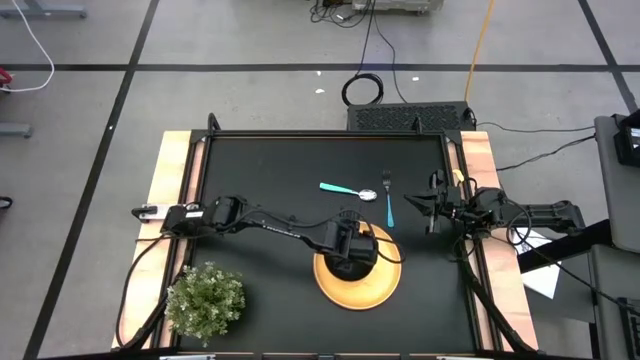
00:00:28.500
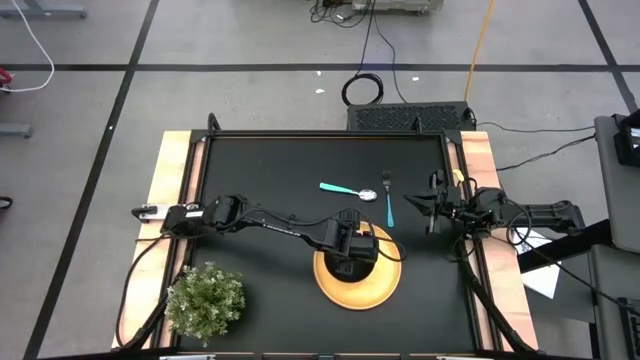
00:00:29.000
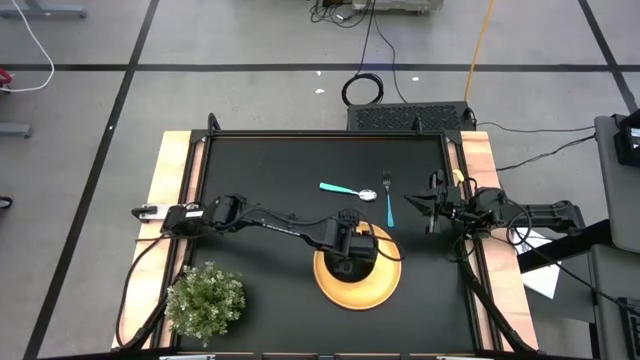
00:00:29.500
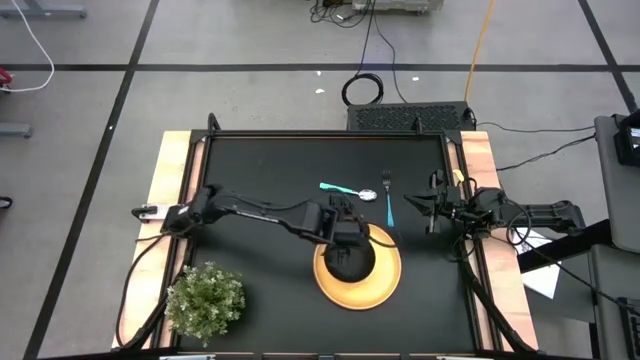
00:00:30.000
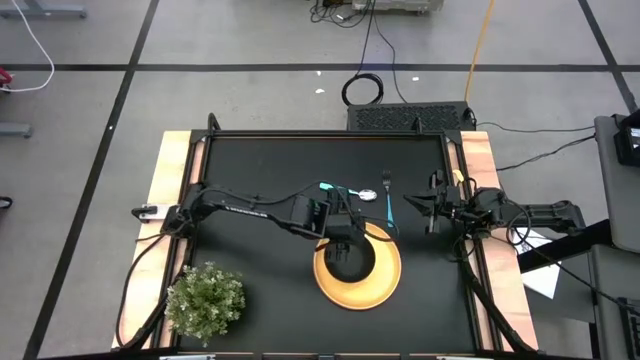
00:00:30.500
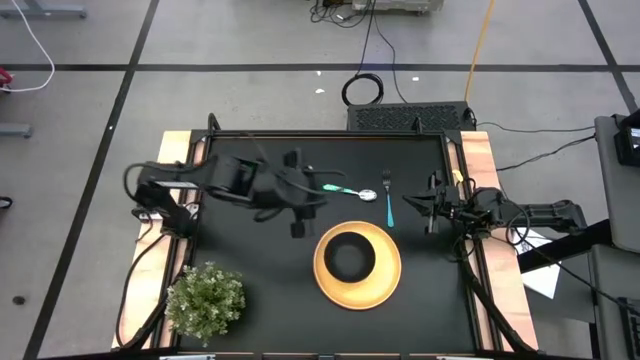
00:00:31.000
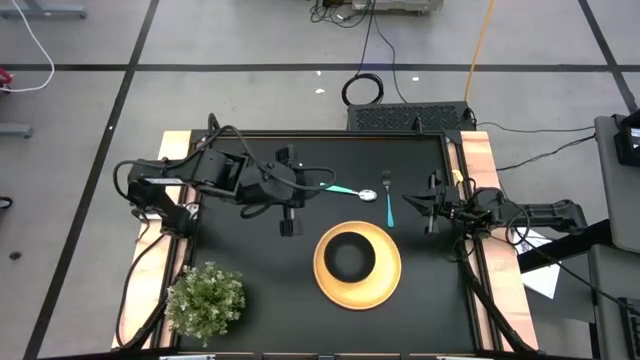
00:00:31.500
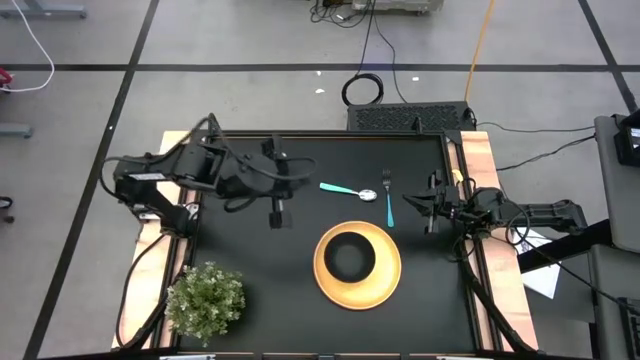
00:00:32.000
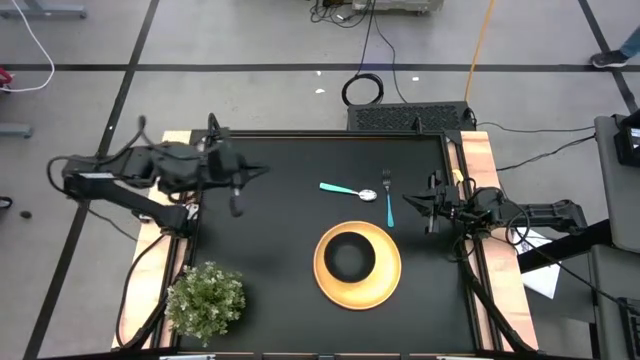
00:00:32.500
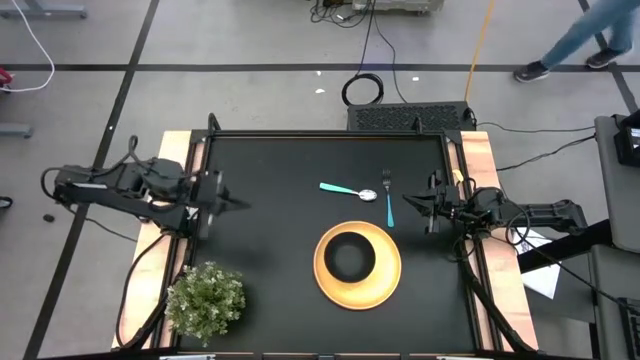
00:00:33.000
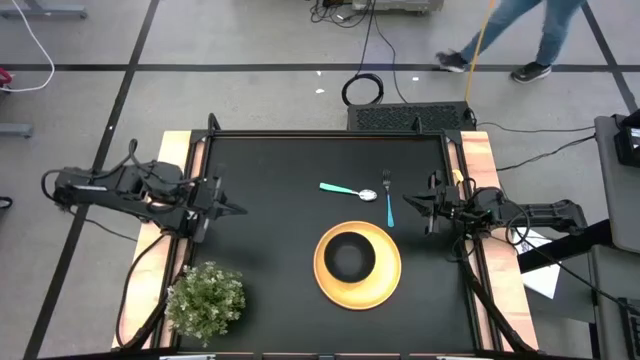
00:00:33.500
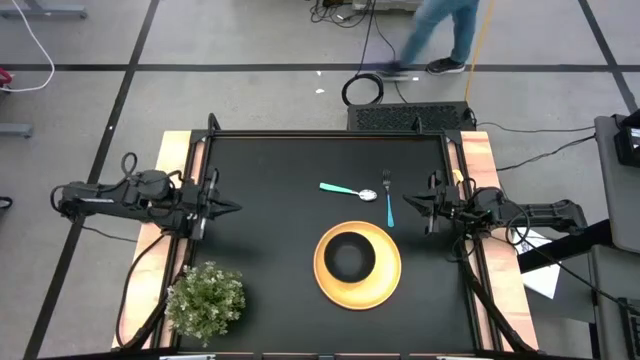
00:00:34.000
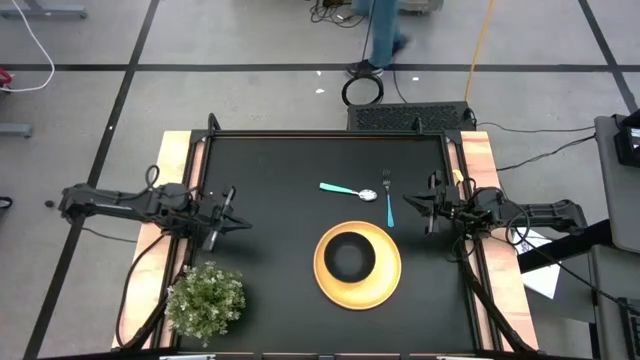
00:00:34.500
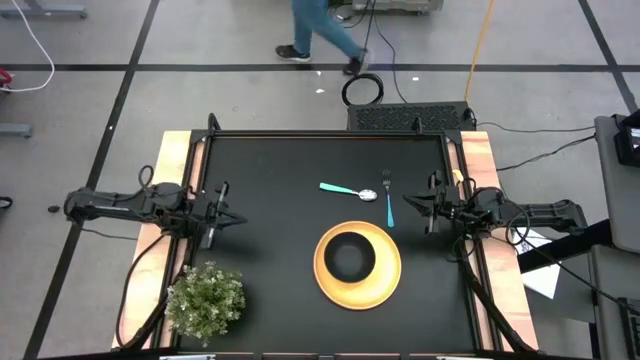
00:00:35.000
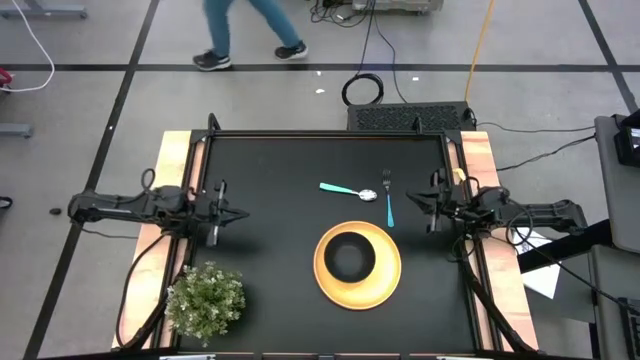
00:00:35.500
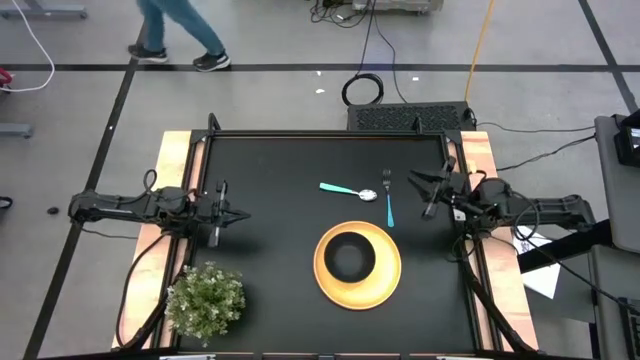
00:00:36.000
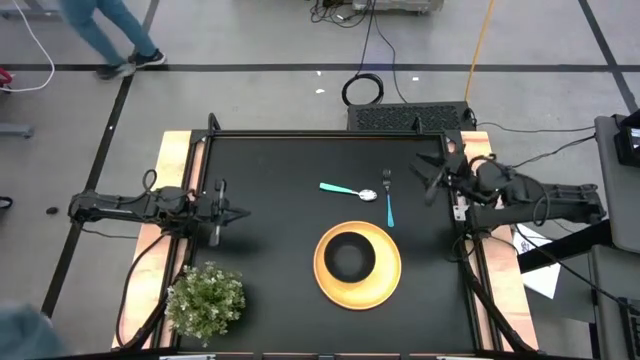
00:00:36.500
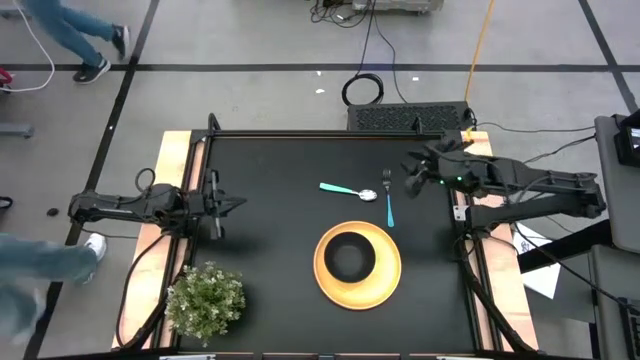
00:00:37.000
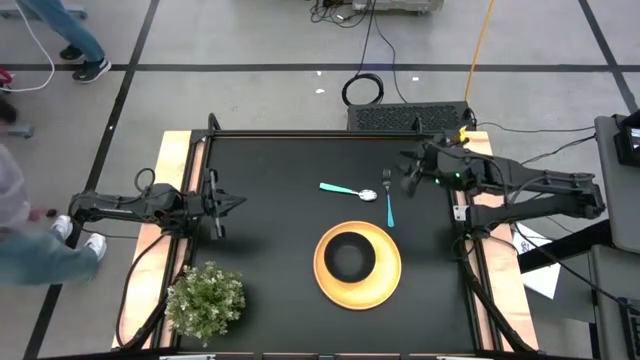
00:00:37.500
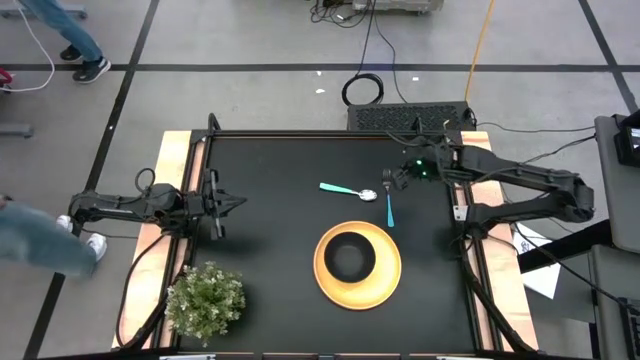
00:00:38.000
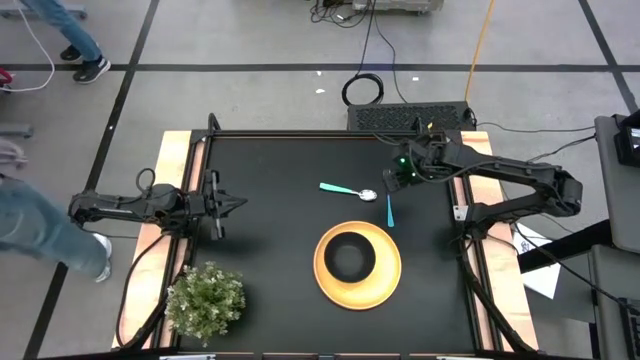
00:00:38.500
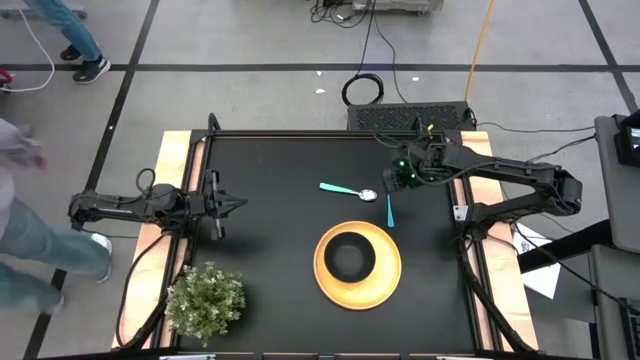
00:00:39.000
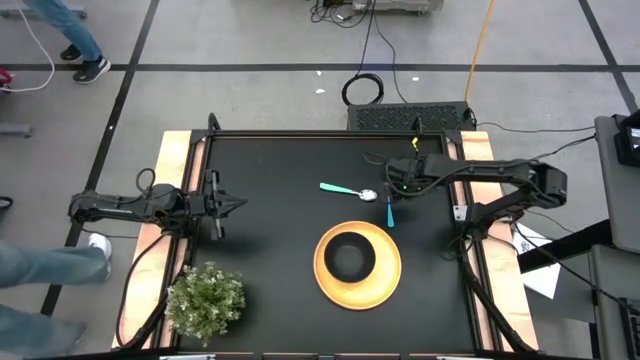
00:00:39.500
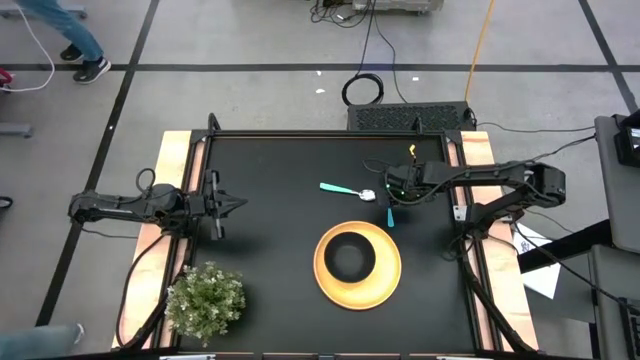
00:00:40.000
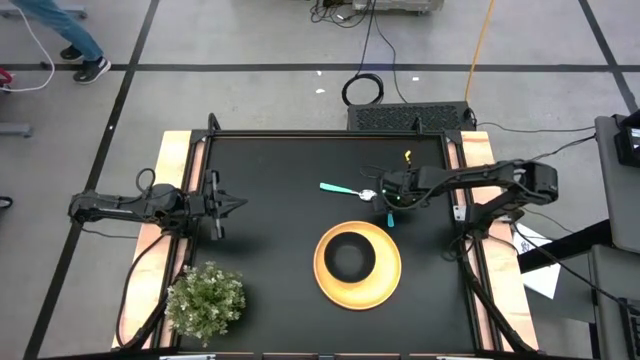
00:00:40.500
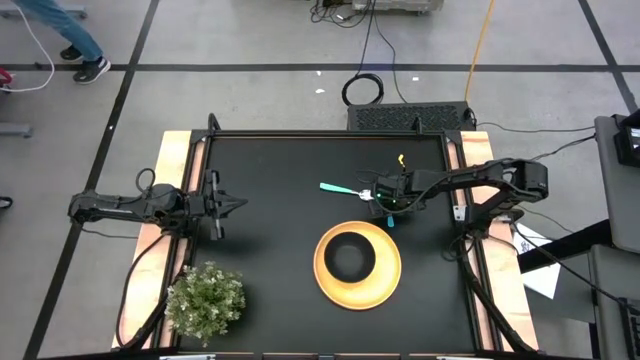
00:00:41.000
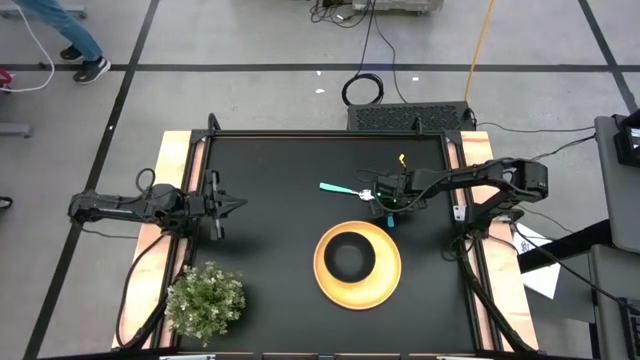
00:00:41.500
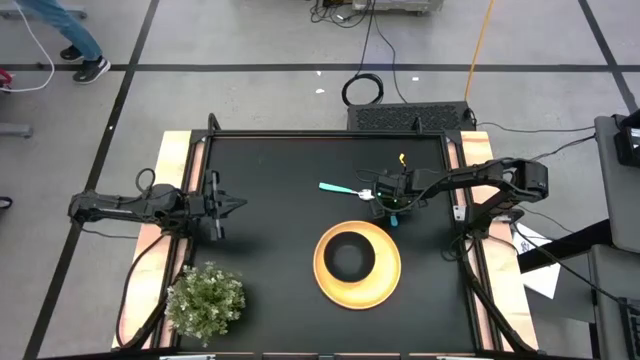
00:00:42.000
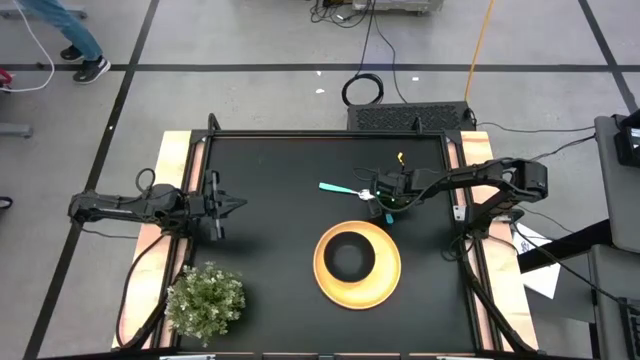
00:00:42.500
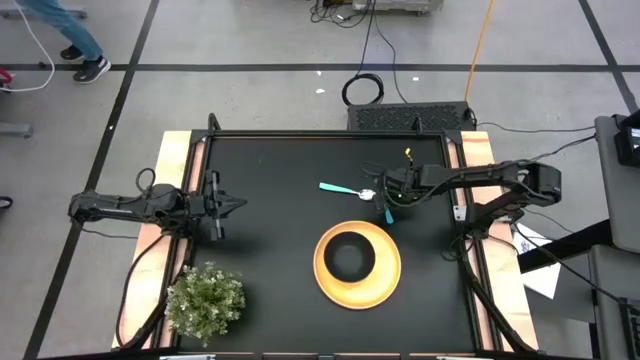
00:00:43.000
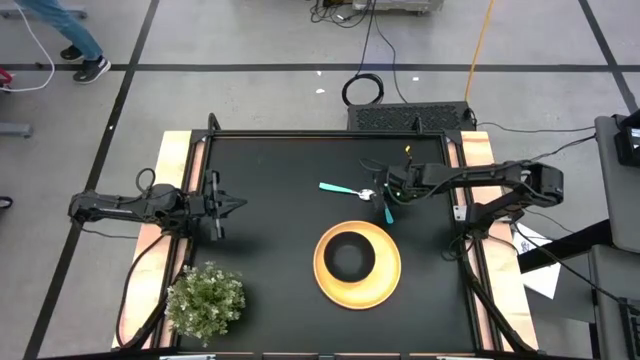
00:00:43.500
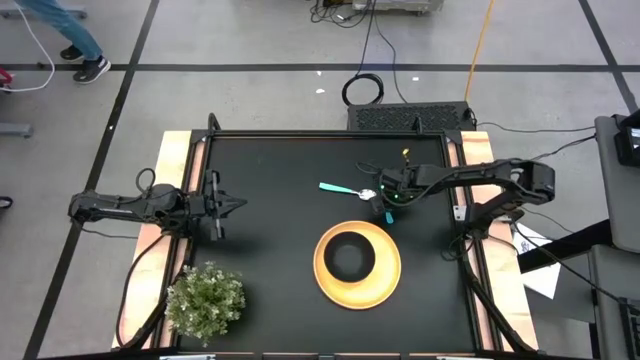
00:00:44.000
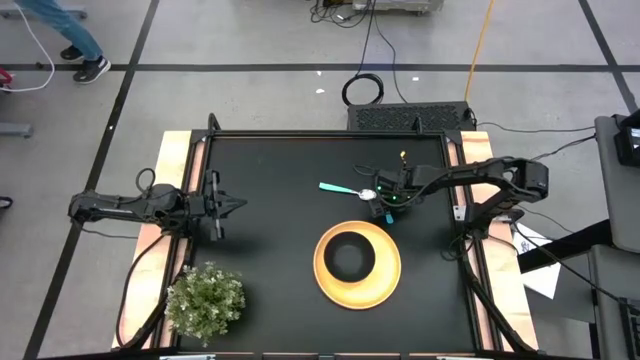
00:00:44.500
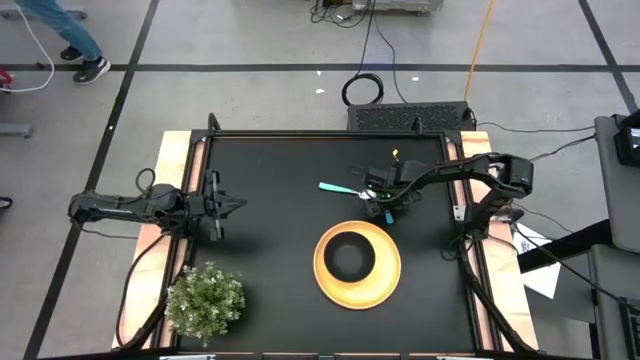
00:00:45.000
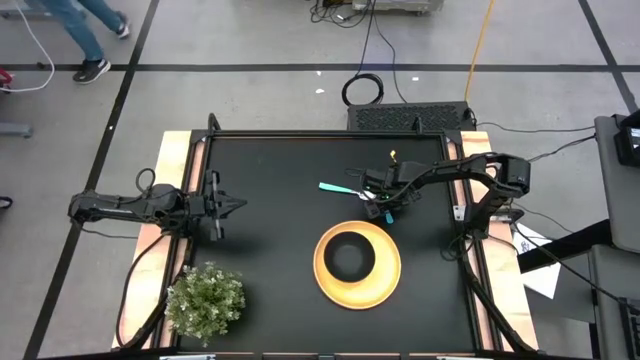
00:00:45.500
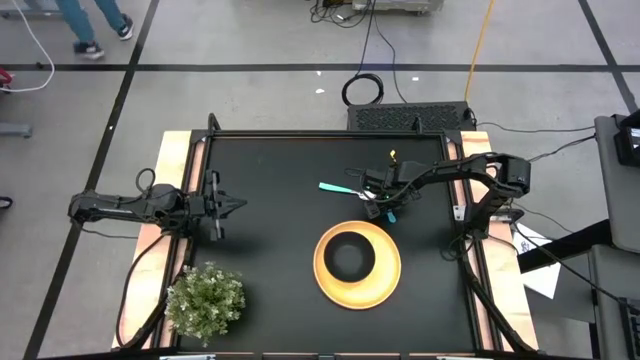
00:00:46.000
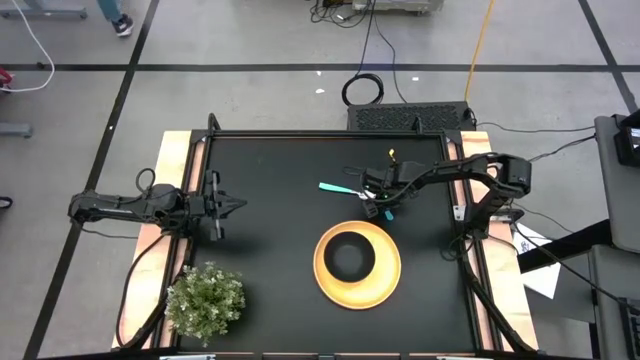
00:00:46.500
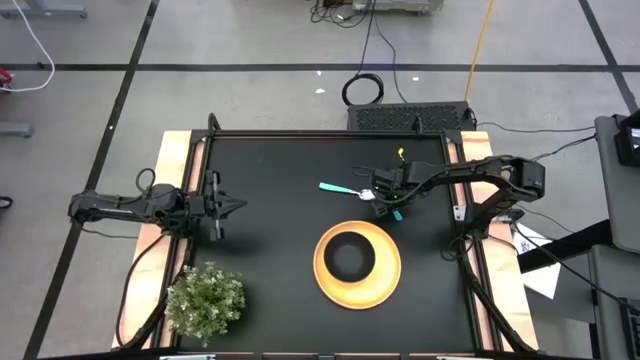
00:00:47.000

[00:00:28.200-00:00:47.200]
Task: Set table place
Put the blue fork to the right of the black bowl on the yellow plate

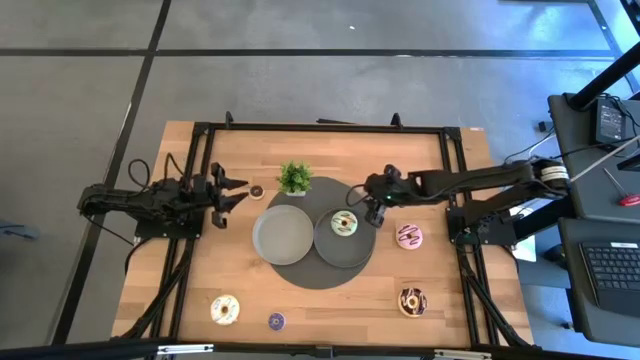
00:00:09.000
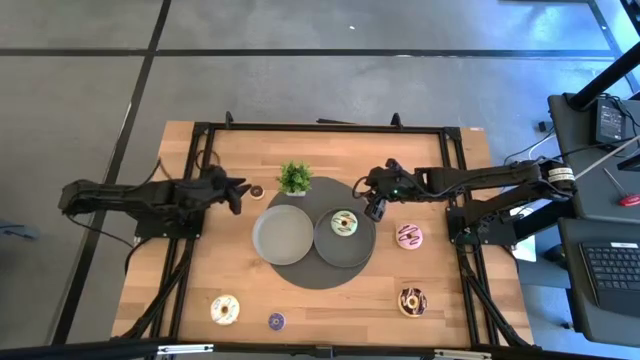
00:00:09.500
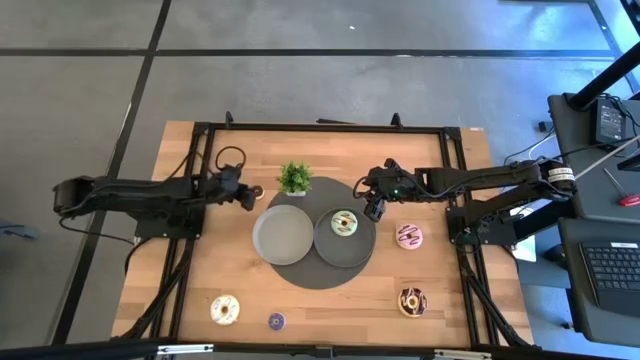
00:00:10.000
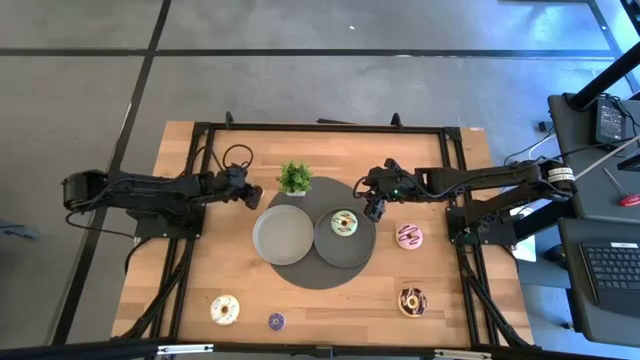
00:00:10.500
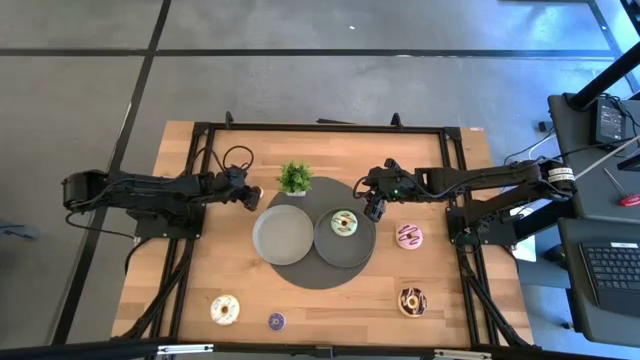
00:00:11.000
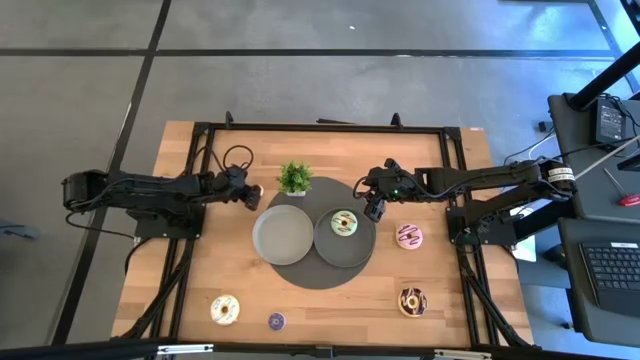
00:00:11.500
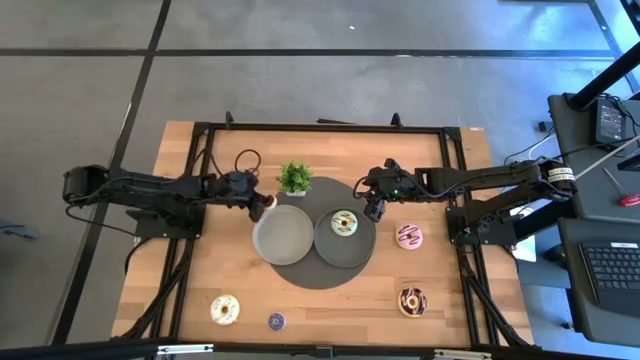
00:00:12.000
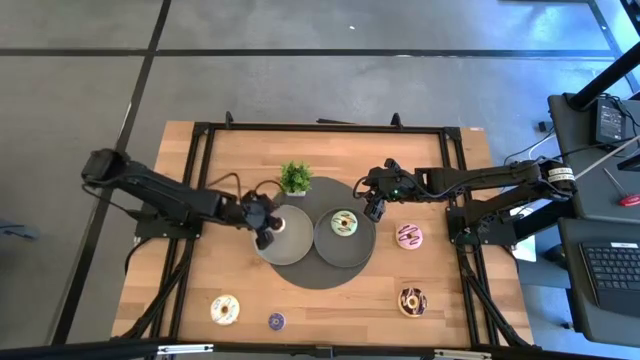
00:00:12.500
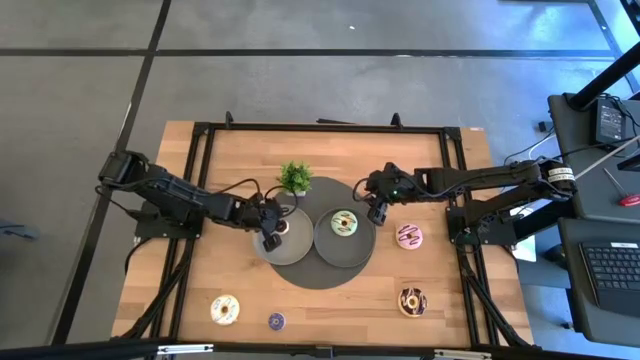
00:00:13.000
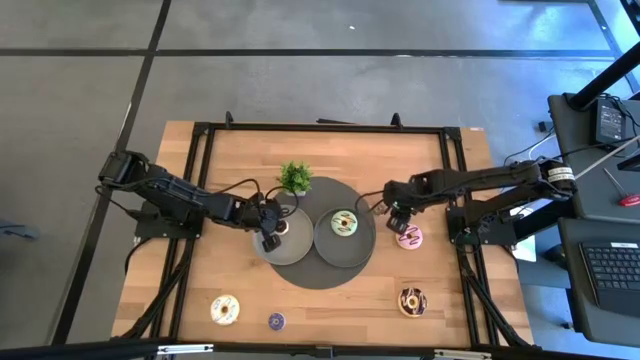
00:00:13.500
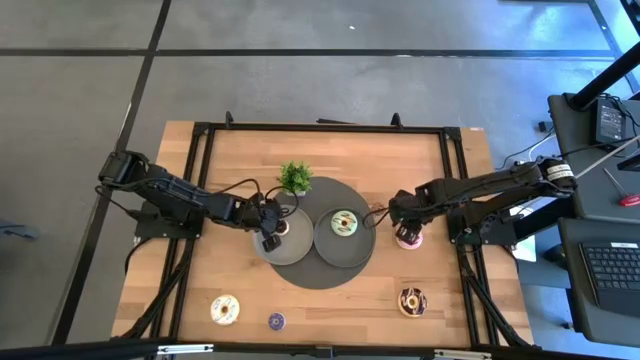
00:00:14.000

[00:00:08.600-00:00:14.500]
Task: Pick & Place donuts
Put the small dark brown donut on the gray plate
